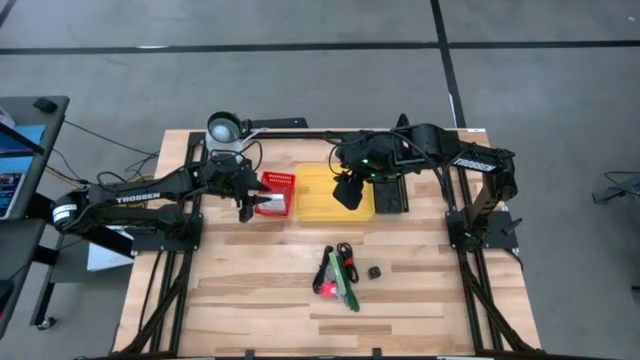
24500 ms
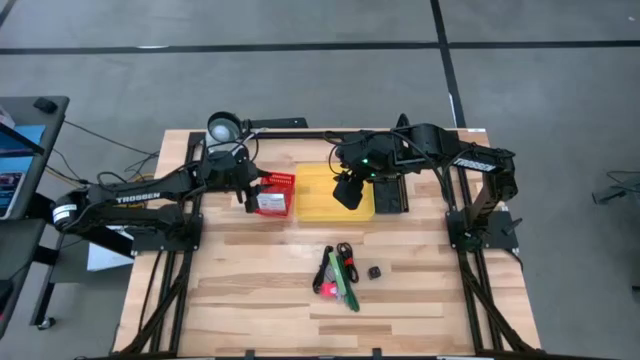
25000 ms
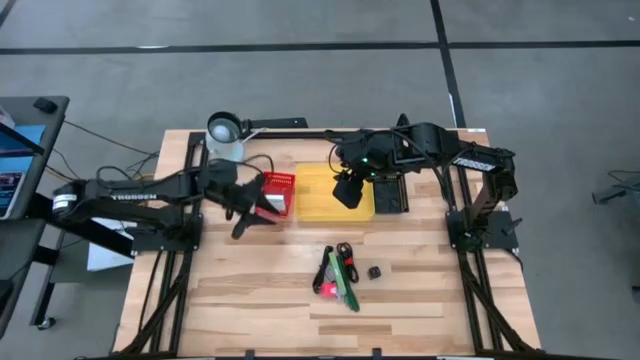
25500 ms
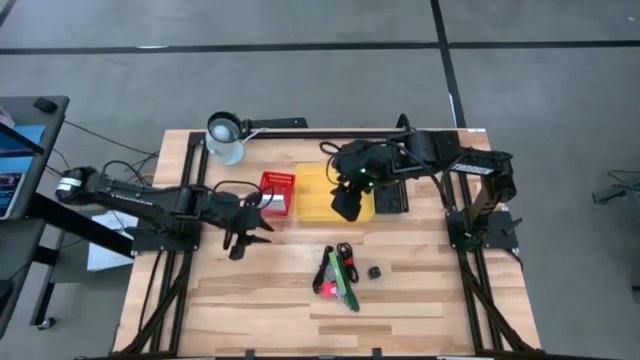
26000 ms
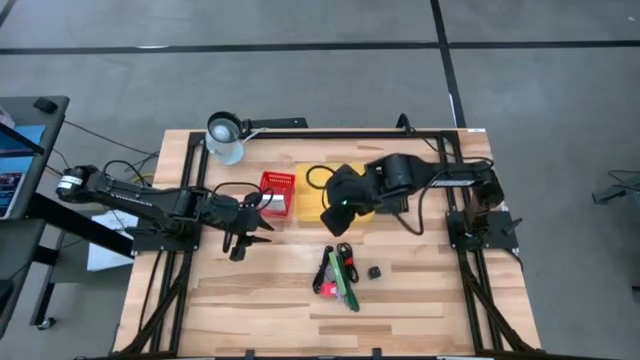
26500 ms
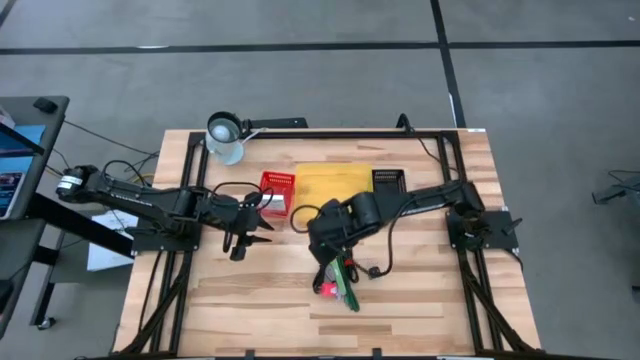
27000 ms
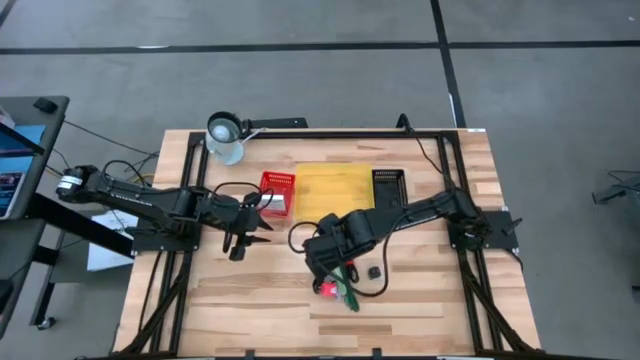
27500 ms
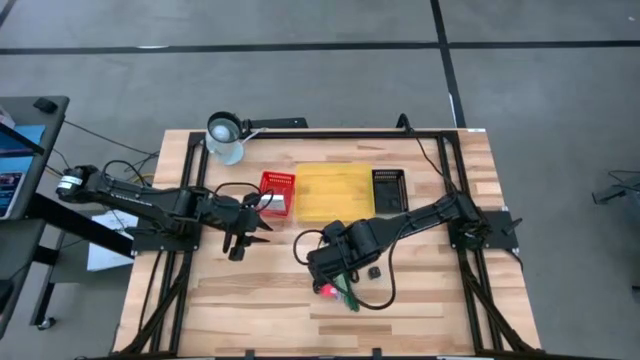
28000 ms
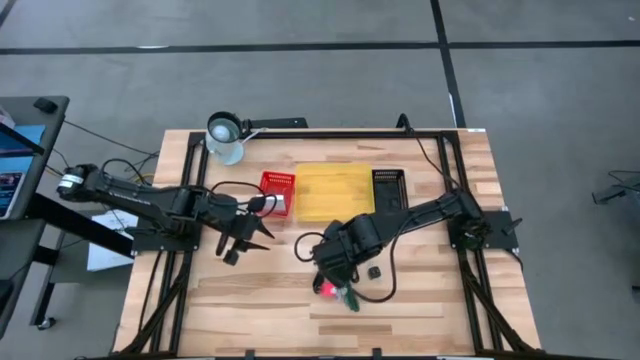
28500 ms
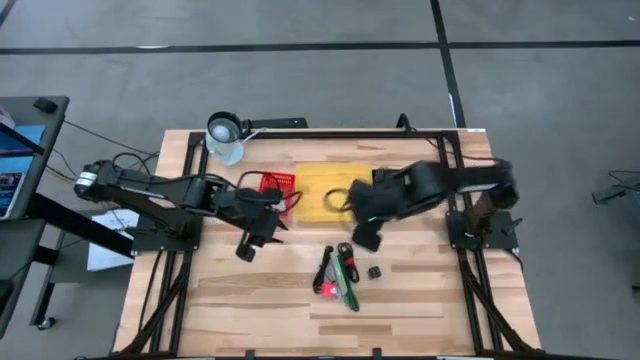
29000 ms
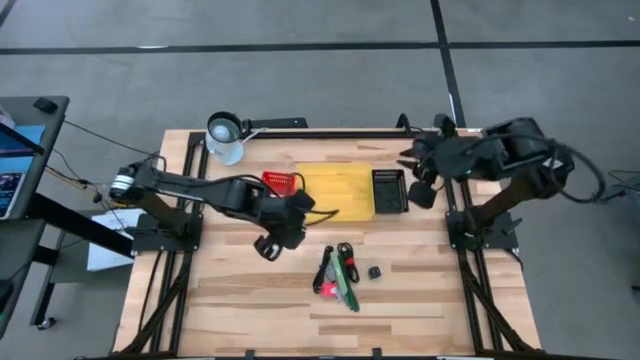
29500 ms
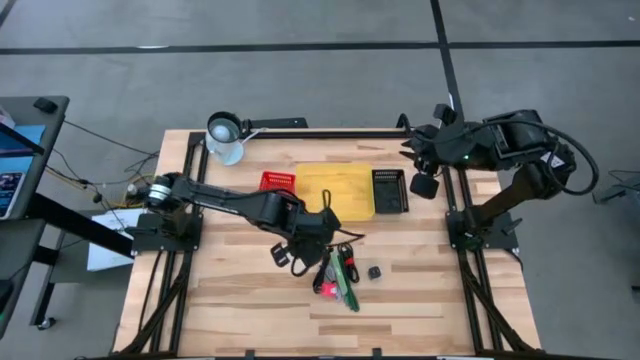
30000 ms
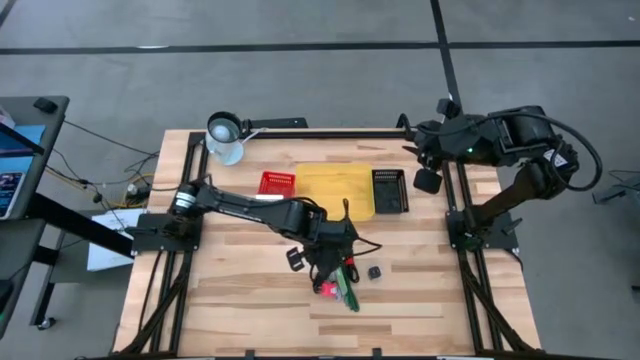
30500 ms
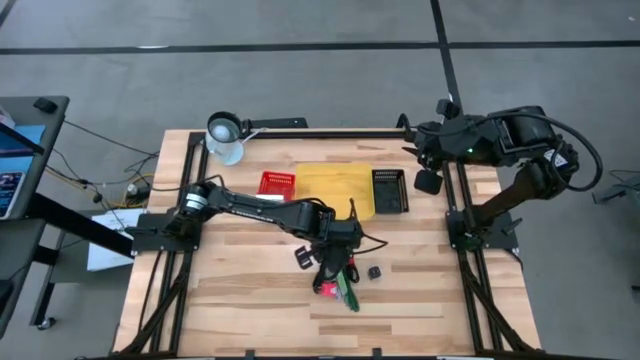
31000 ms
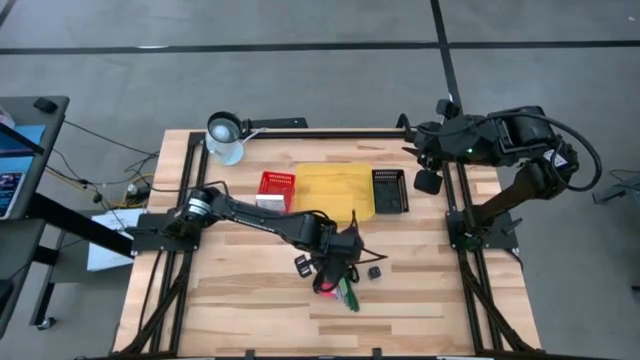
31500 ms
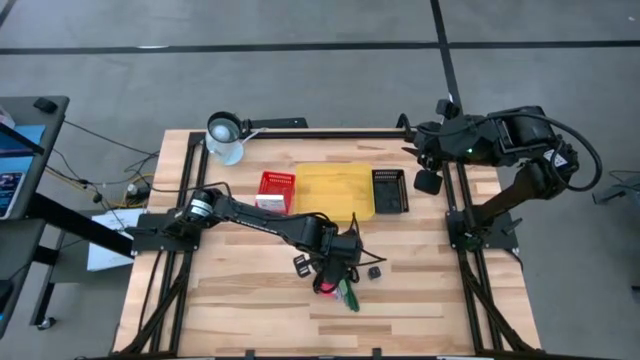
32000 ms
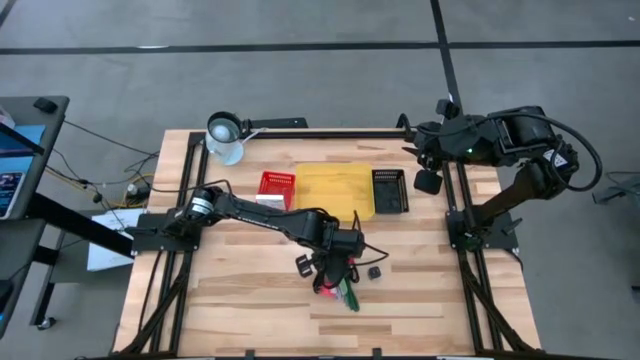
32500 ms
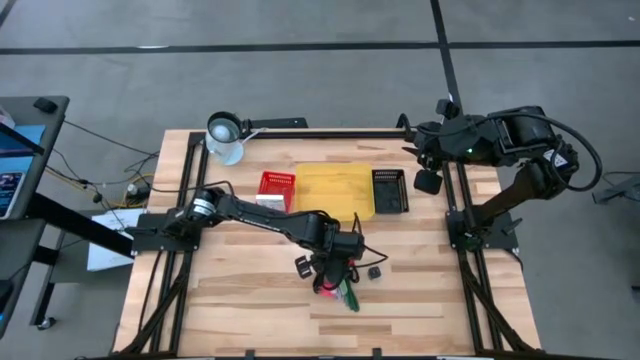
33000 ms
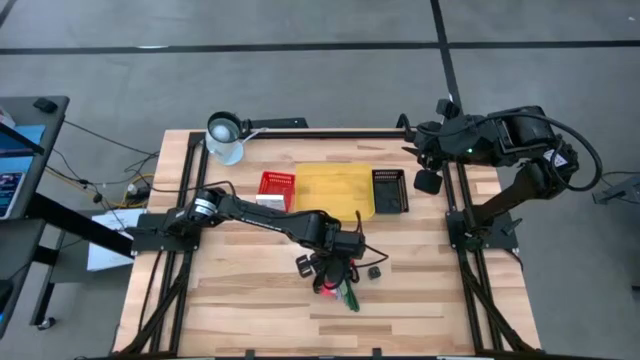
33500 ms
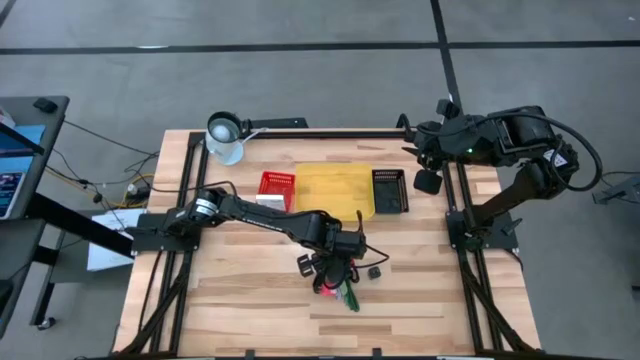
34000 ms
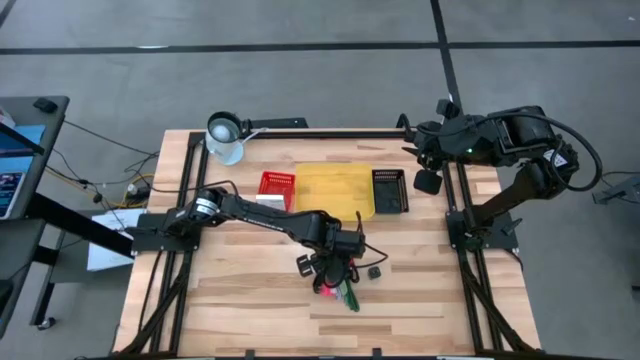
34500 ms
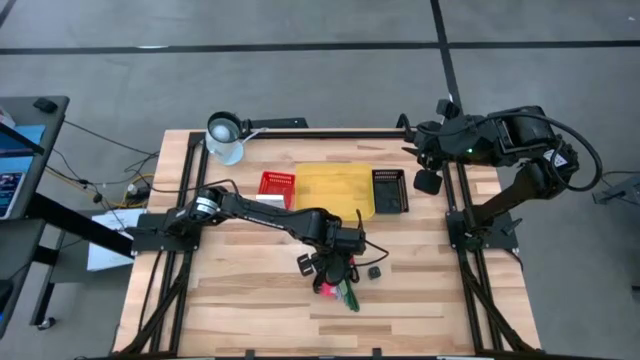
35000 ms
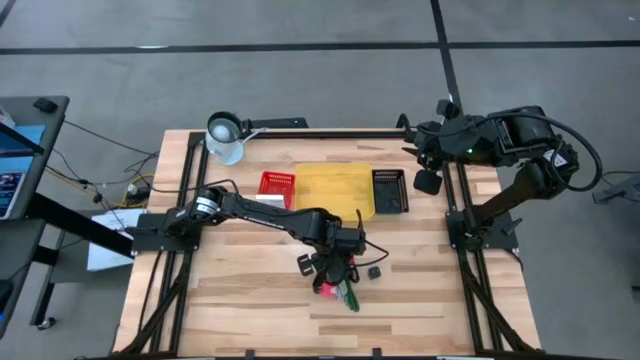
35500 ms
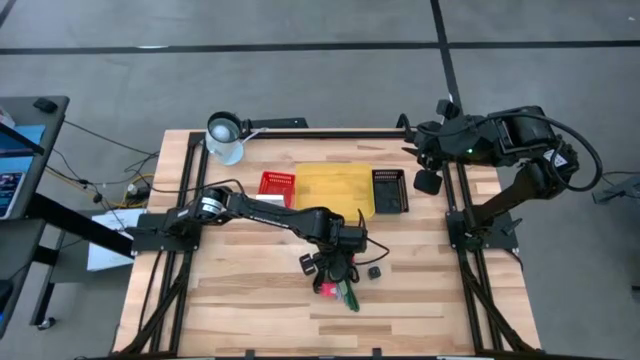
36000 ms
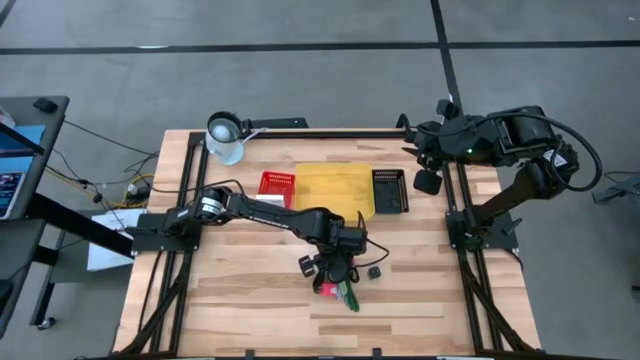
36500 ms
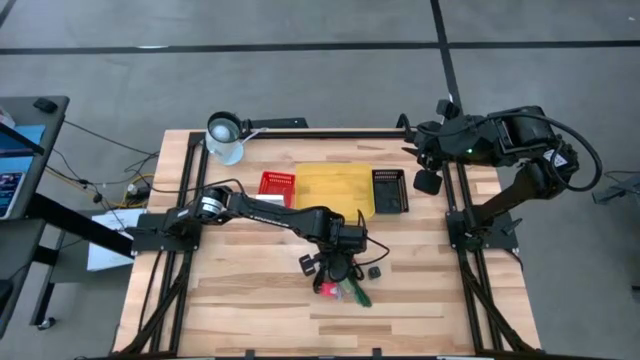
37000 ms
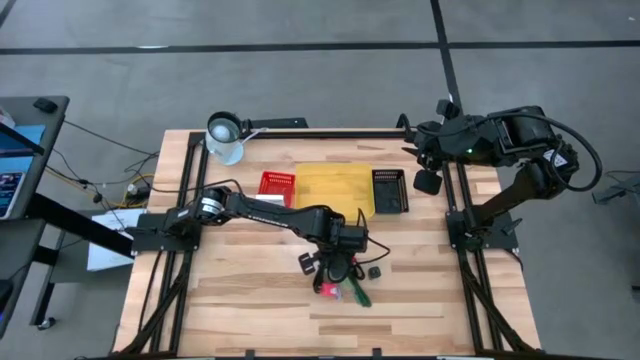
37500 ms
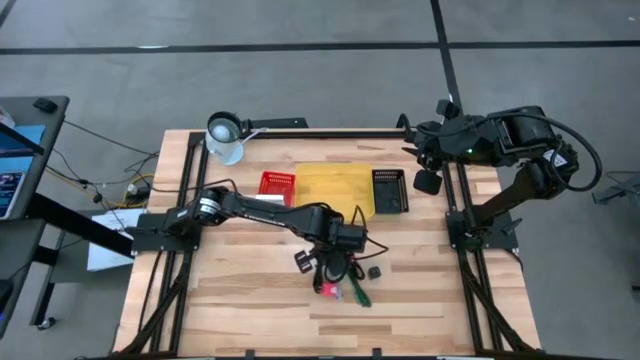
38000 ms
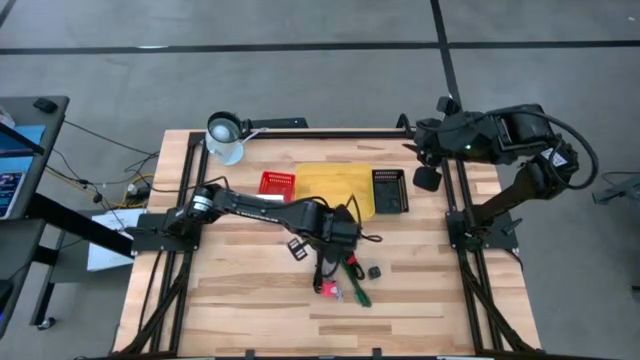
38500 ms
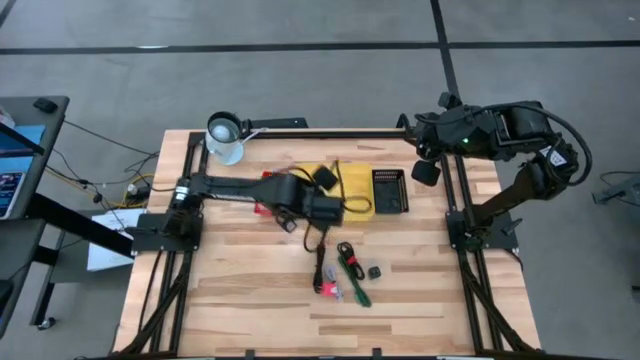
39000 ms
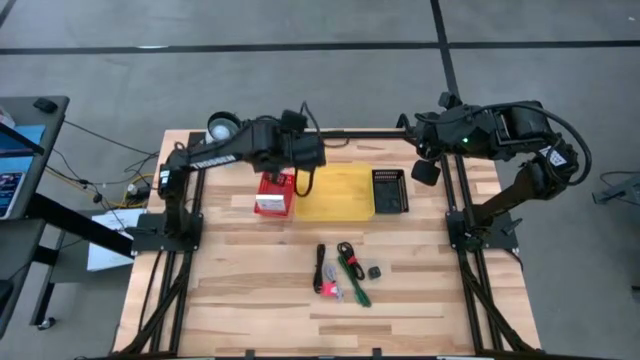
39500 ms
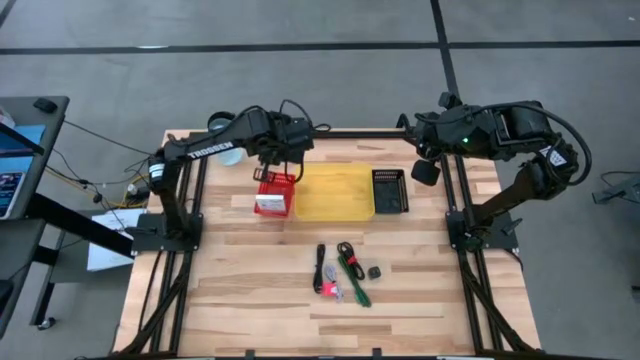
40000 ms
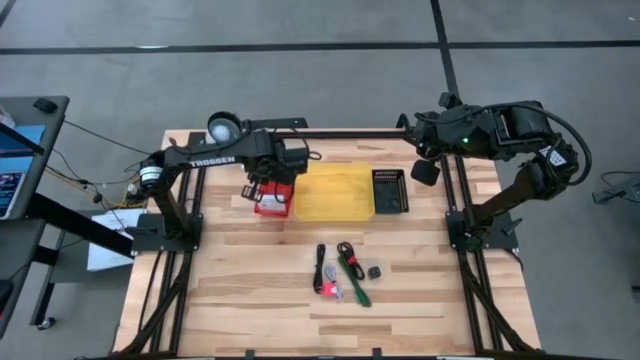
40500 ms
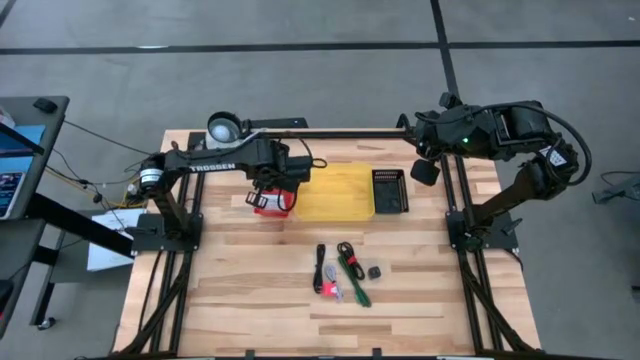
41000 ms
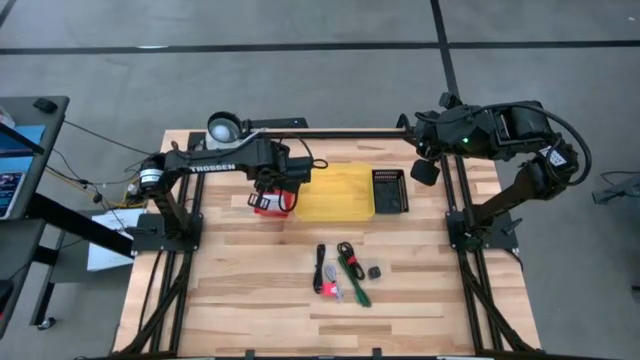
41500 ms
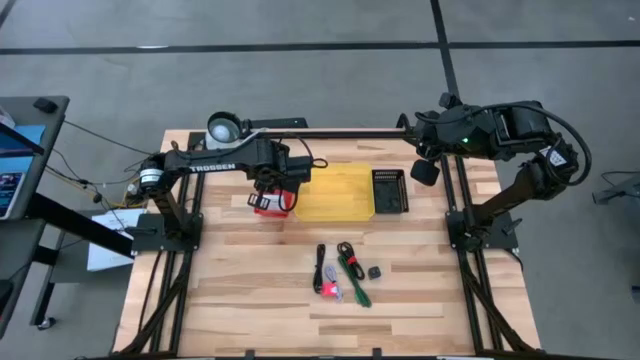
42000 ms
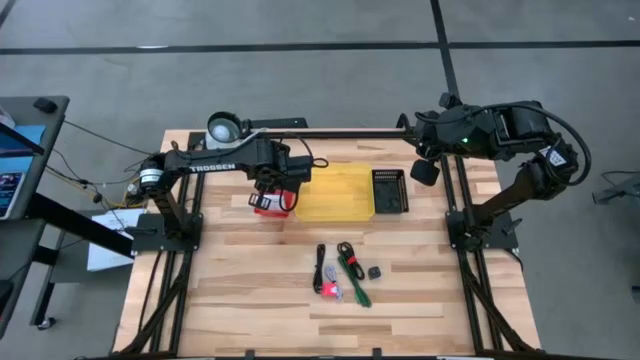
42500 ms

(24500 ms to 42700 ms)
Task: Pick and place items into bin
Put the card reader box into the red bin
